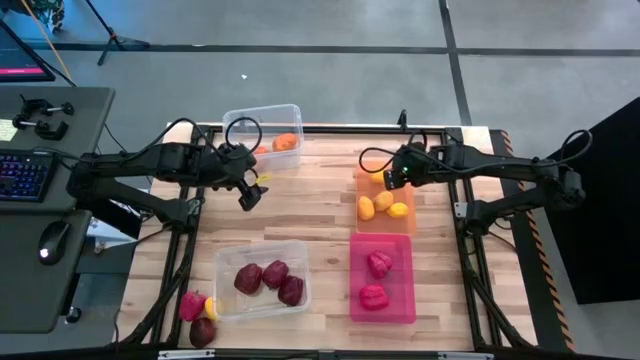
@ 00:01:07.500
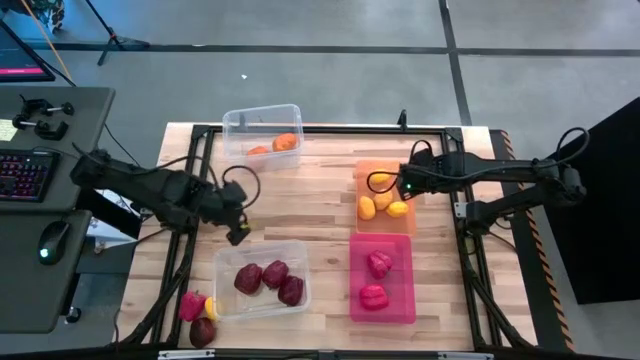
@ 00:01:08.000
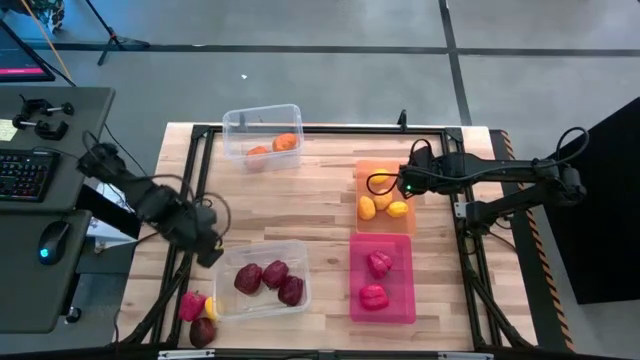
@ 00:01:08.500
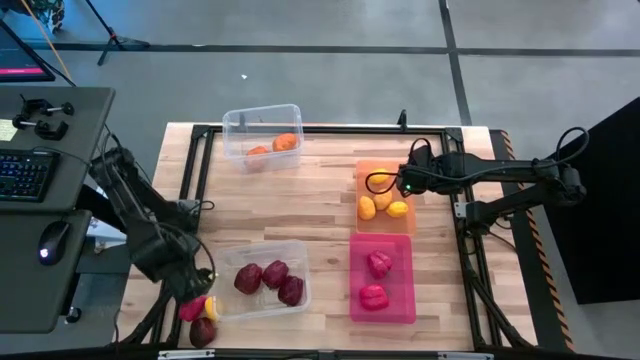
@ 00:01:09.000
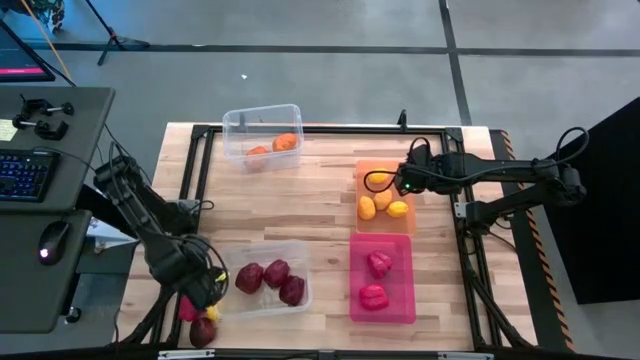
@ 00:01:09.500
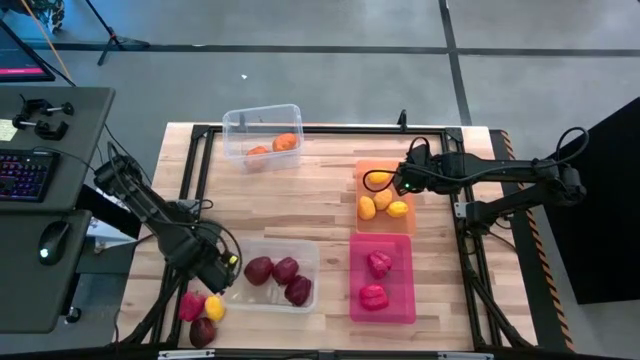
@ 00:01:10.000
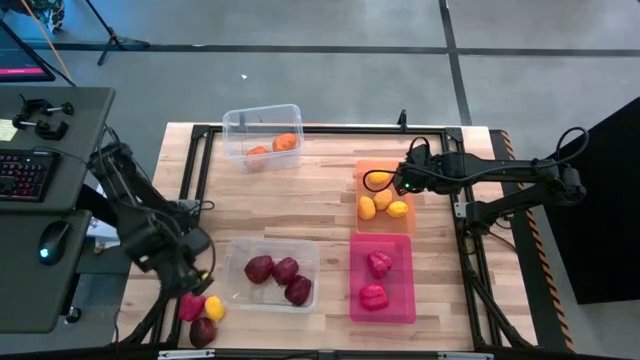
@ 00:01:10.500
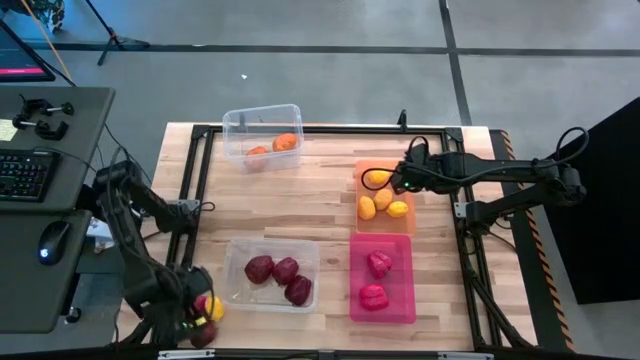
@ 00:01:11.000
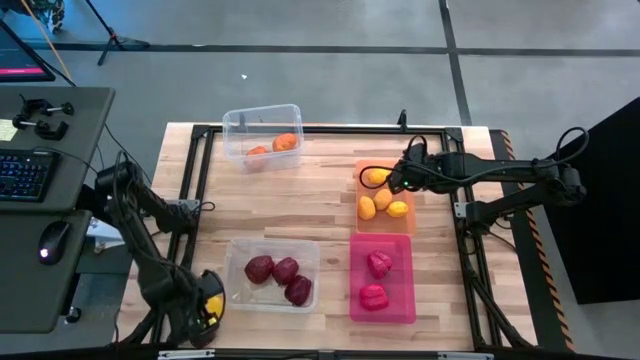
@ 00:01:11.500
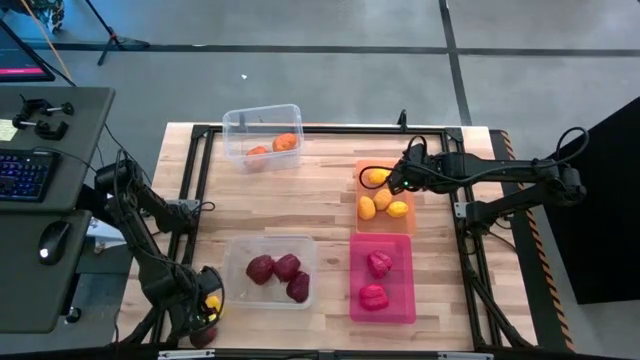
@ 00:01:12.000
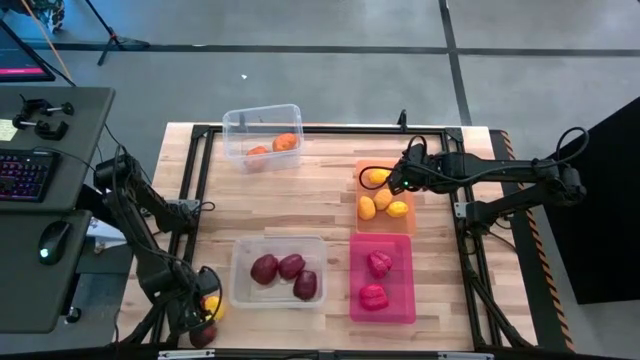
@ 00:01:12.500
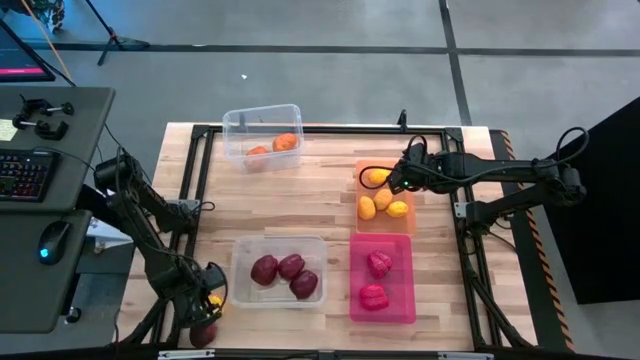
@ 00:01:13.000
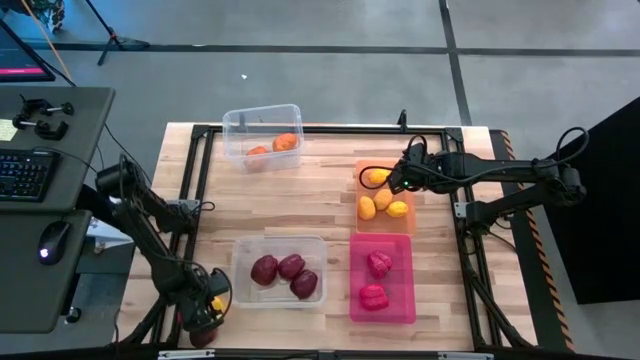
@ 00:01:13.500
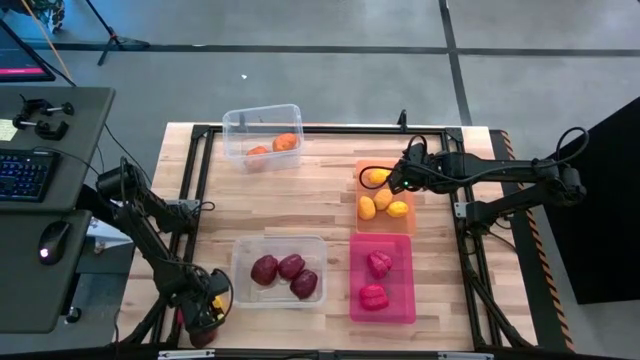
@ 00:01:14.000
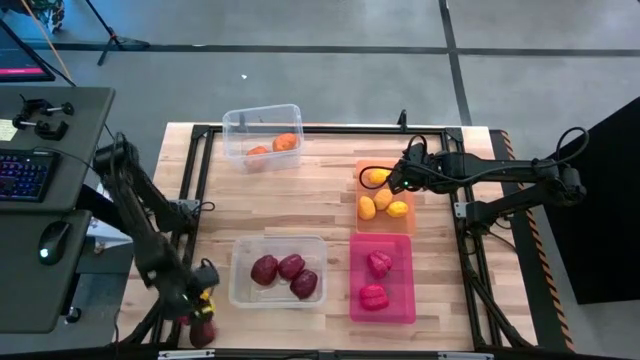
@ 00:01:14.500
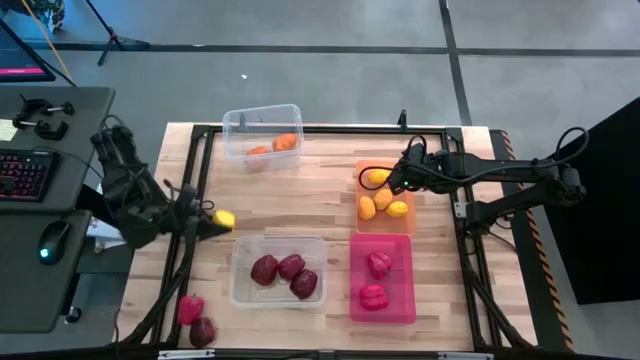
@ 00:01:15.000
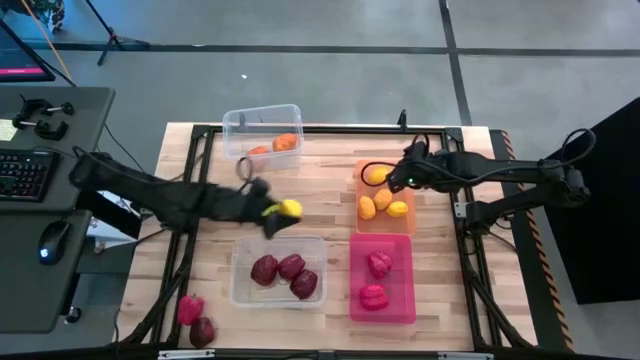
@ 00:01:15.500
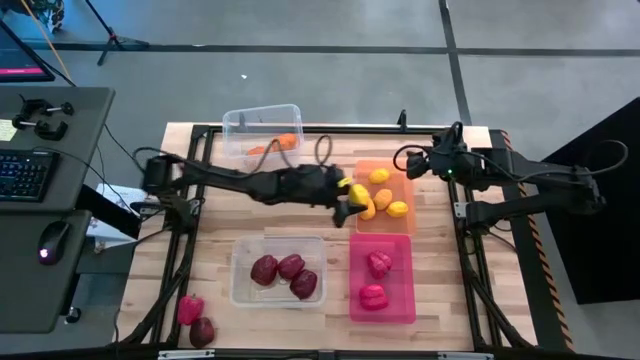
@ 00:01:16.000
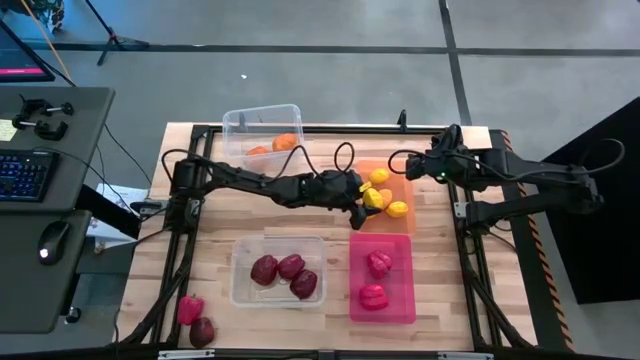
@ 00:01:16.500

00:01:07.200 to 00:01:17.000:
Task: Sort produce into baskets
Put the yellow lemon into the orange bin

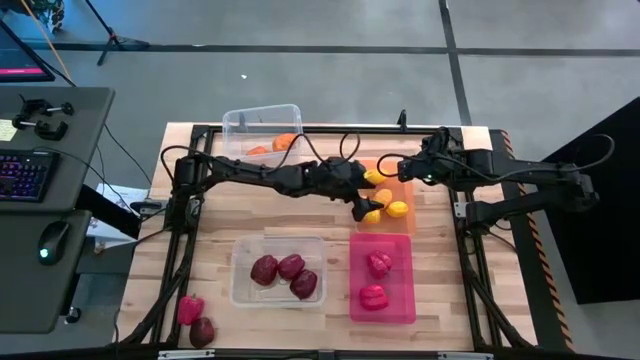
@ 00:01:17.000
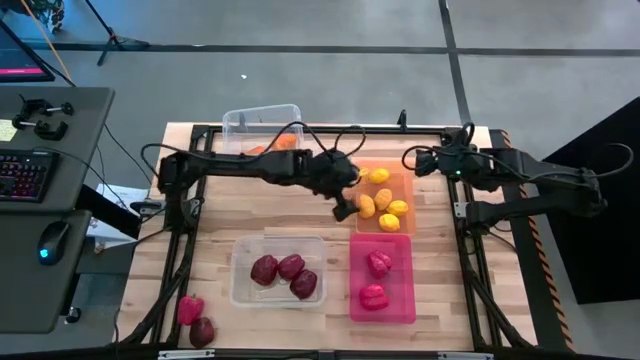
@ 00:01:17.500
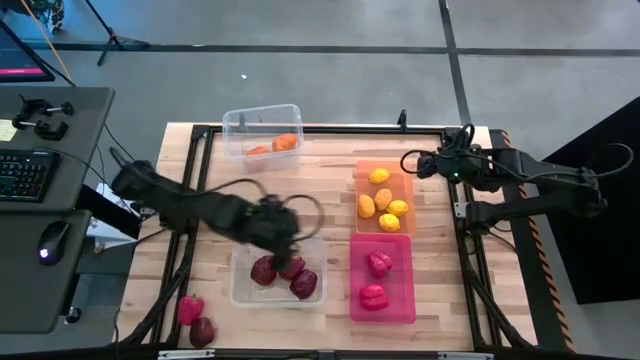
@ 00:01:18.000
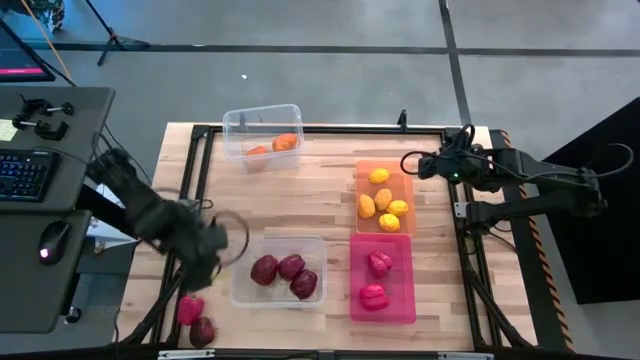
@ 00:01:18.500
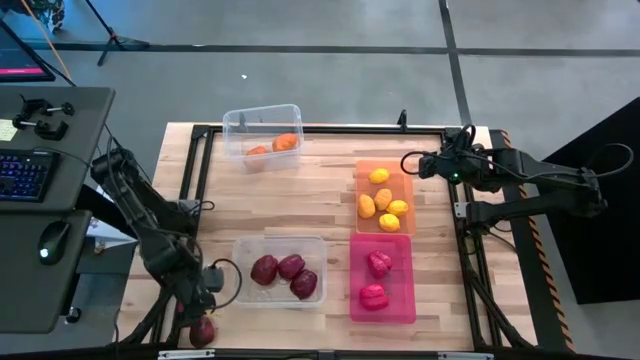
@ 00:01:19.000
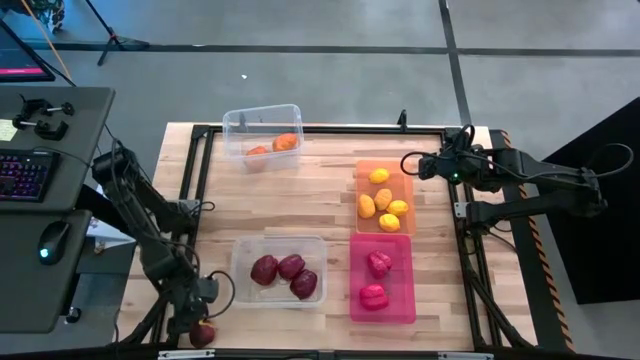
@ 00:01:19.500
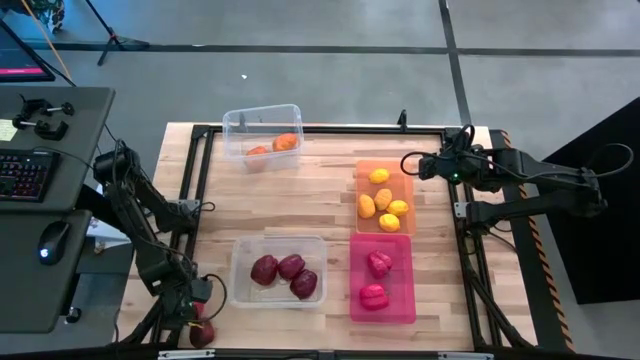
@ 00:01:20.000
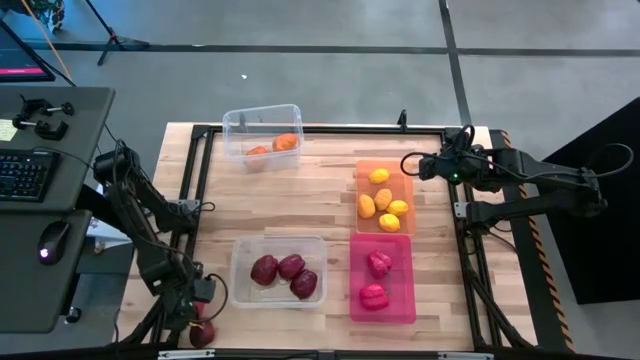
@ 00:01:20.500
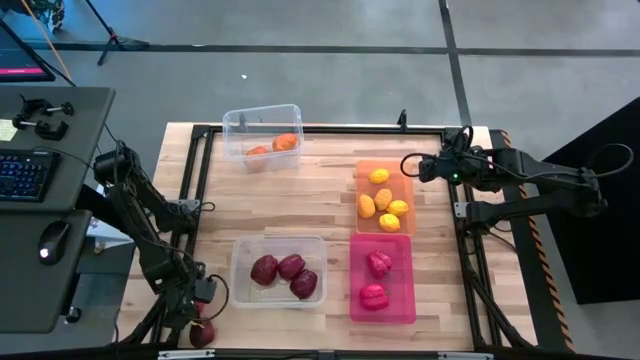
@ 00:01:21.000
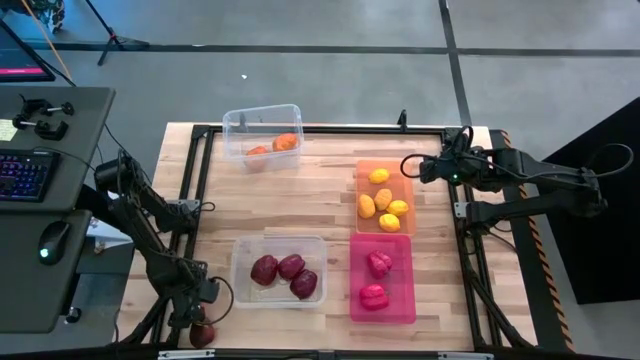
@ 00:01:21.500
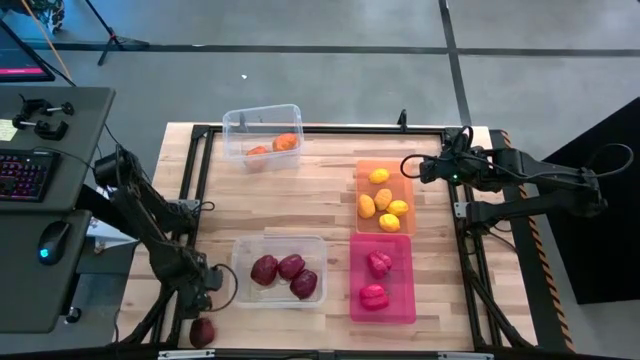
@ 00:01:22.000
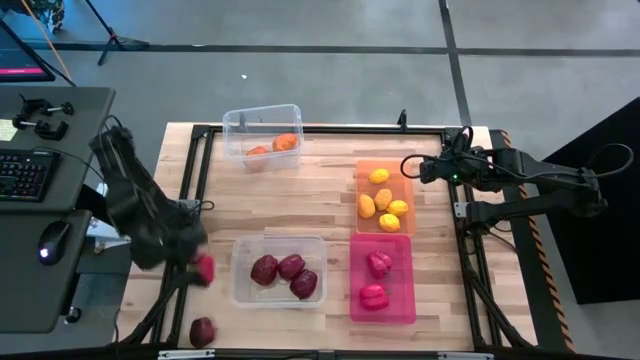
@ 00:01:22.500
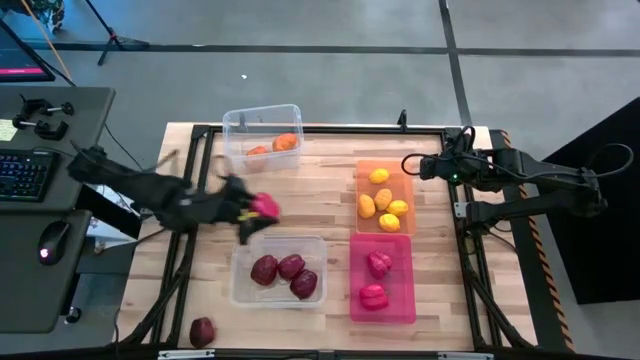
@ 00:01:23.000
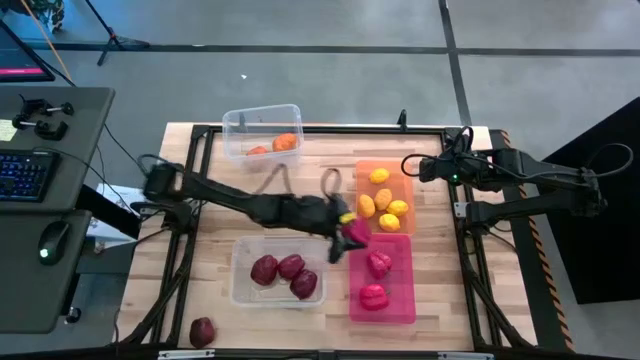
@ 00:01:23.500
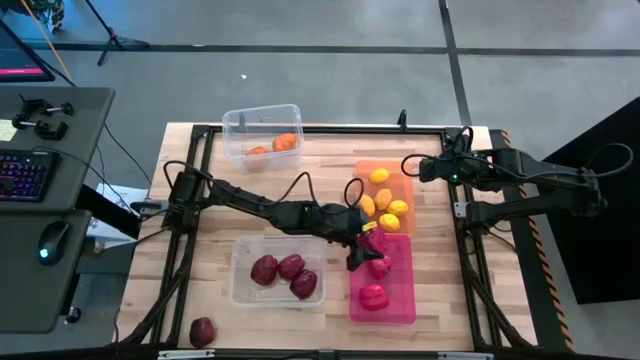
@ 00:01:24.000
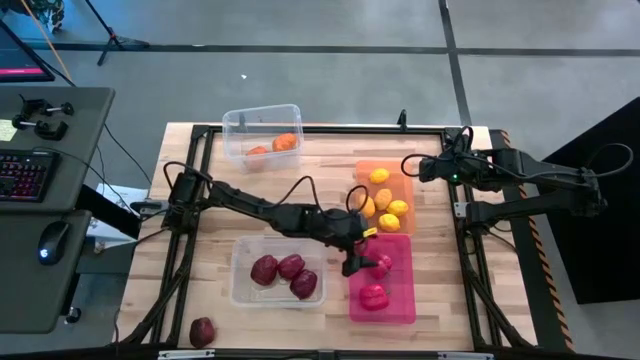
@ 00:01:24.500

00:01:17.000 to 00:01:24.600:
Put the red bell pepper into the pink bin

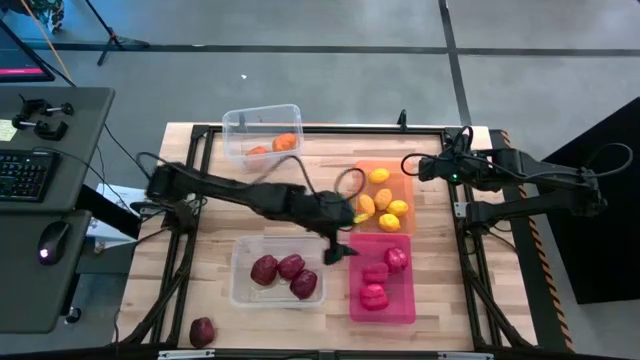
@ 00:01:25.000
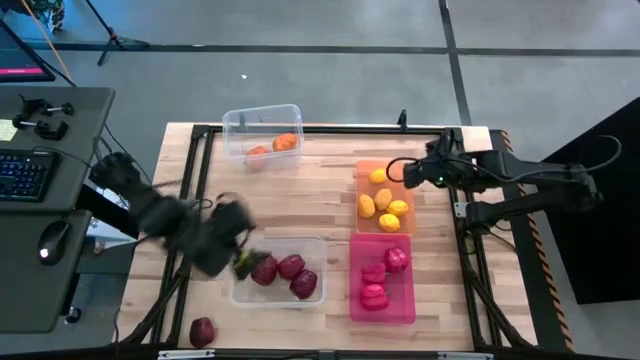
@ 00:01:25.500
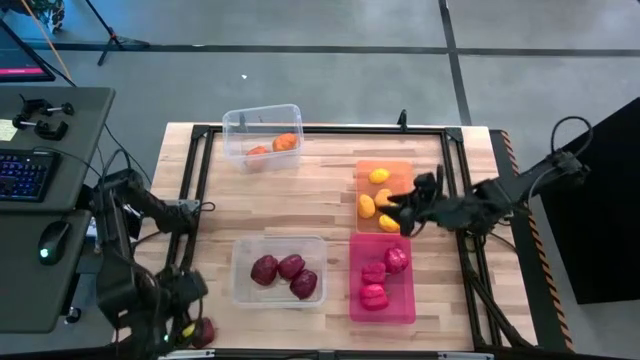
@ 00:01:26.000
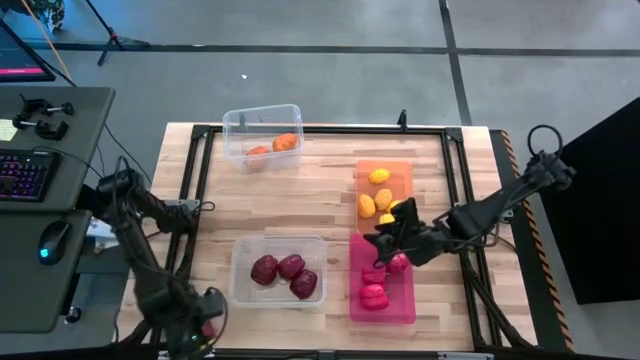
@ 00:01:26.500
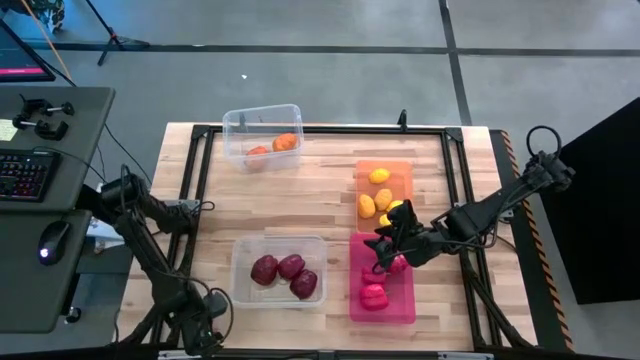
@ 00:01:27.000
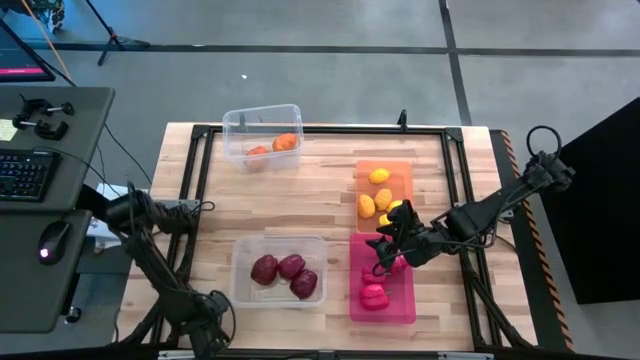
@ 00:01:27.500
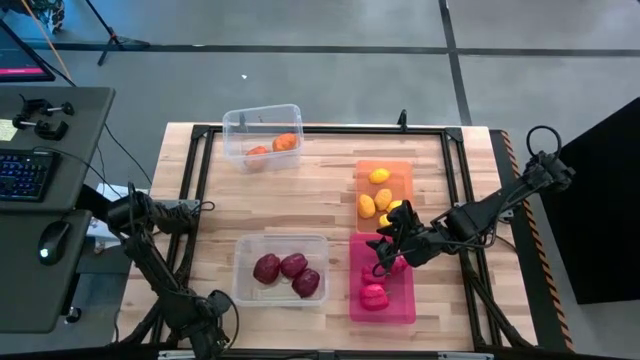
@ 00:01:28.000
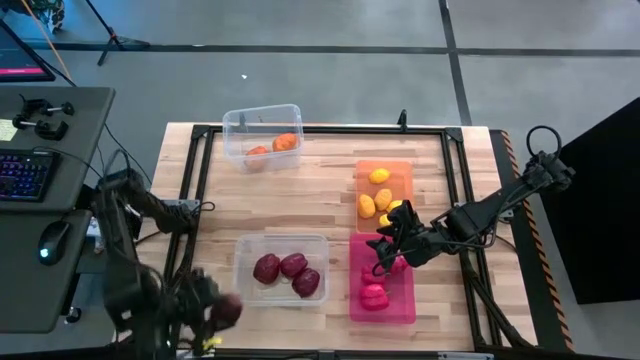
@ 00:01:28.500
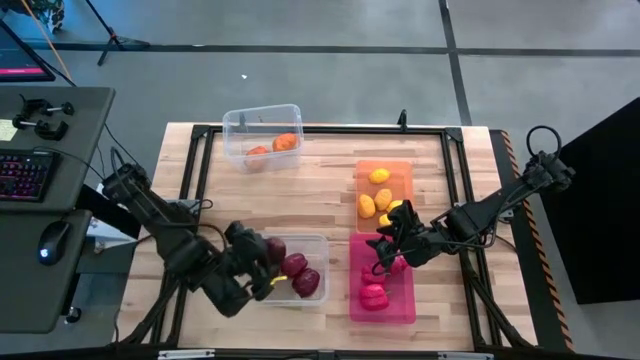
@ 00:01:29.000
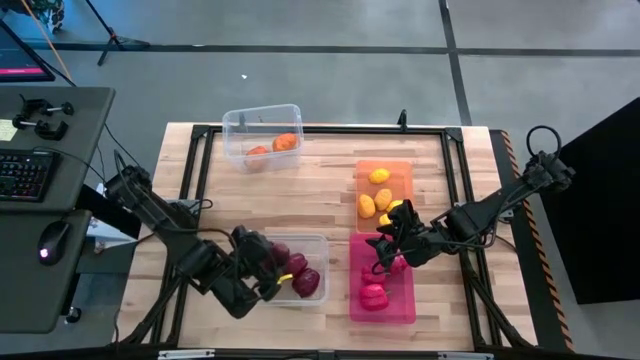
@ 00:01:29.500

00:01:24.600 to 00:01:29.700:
Put the red apple into the bottom transparent bin
